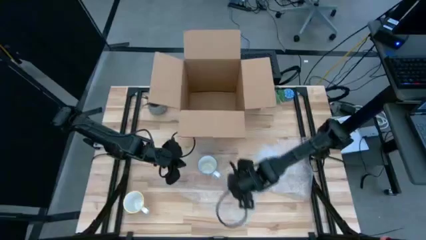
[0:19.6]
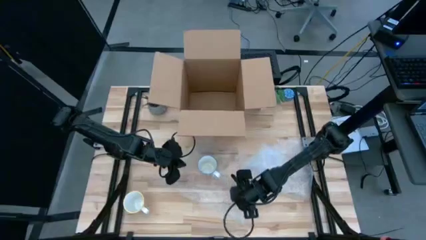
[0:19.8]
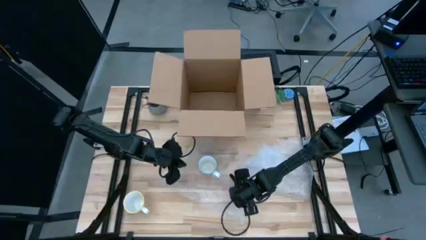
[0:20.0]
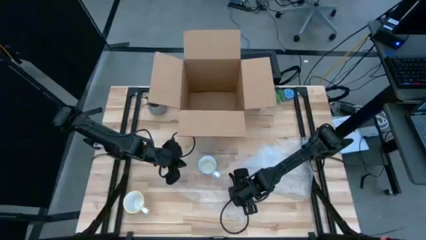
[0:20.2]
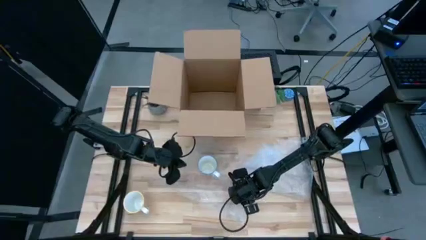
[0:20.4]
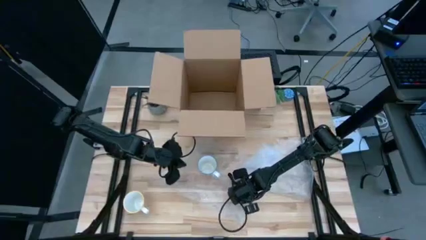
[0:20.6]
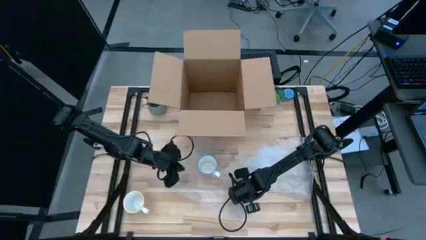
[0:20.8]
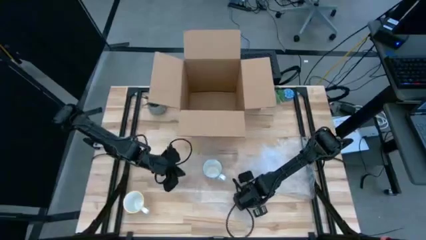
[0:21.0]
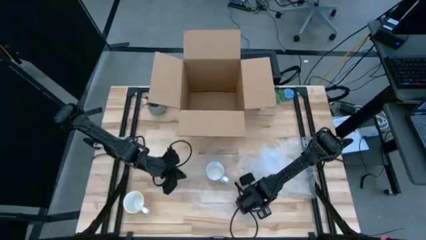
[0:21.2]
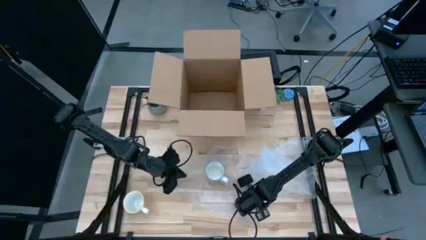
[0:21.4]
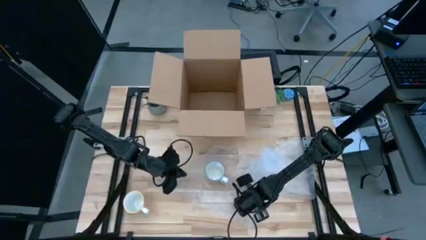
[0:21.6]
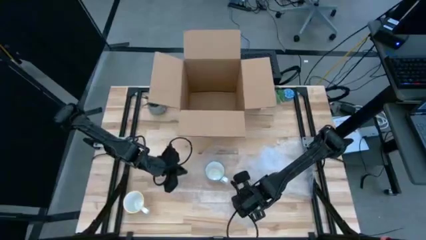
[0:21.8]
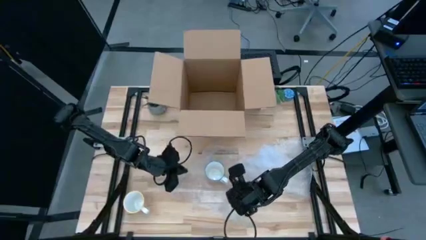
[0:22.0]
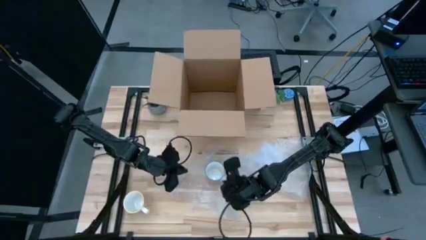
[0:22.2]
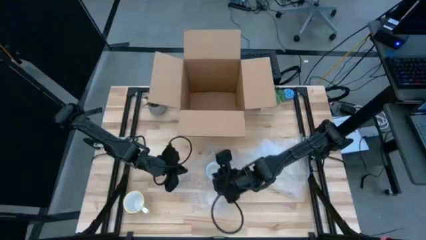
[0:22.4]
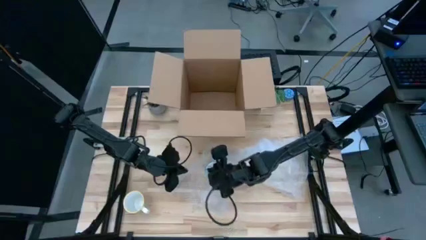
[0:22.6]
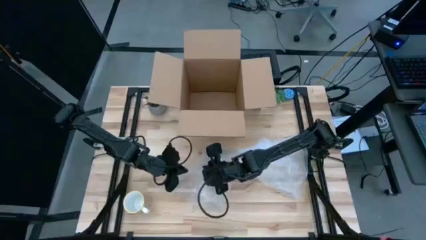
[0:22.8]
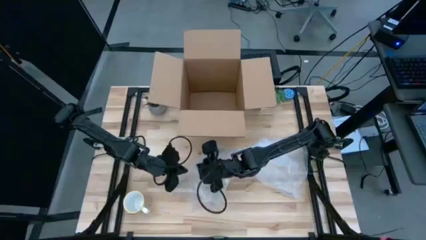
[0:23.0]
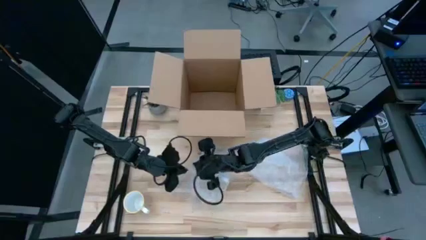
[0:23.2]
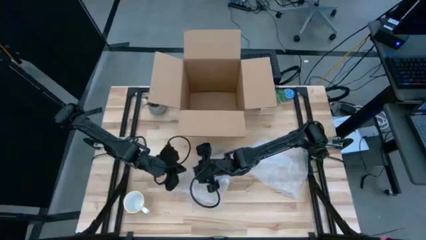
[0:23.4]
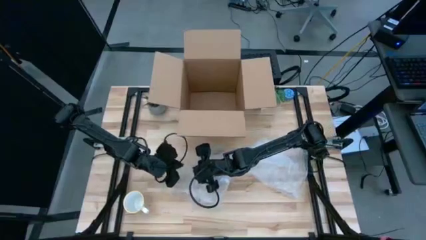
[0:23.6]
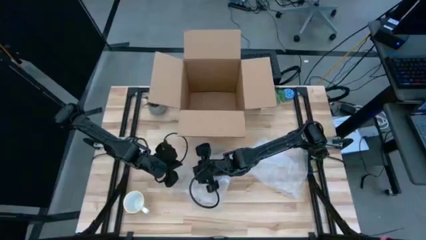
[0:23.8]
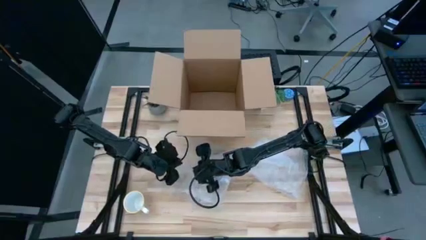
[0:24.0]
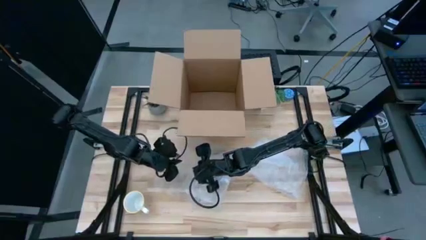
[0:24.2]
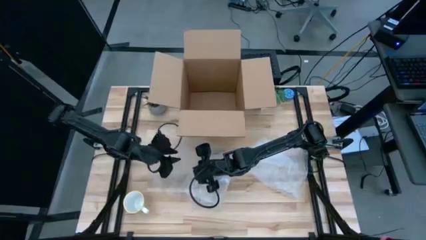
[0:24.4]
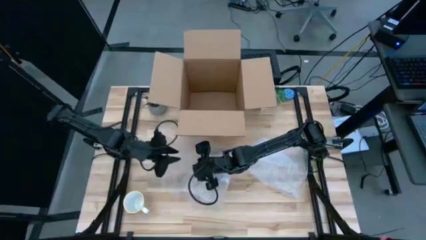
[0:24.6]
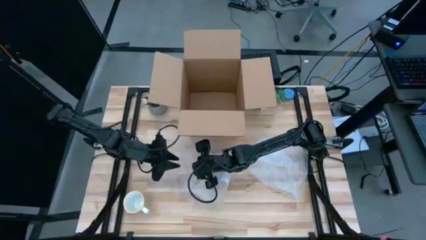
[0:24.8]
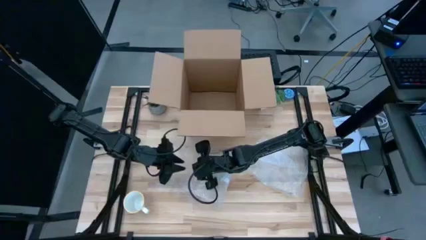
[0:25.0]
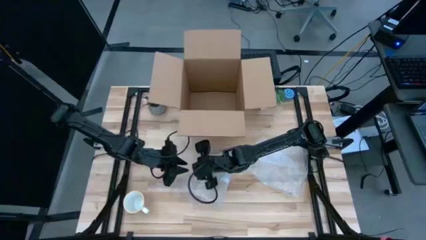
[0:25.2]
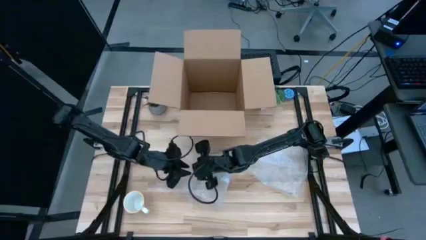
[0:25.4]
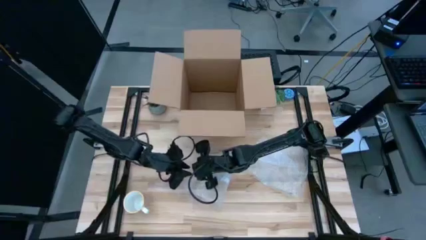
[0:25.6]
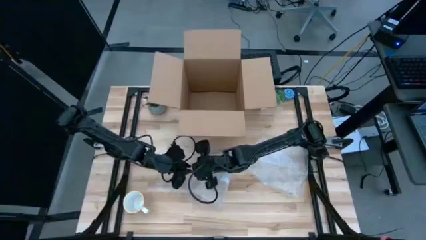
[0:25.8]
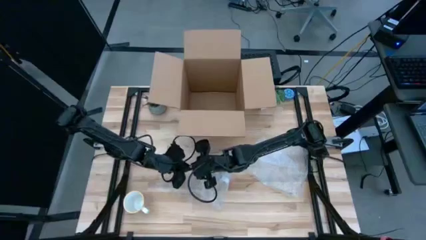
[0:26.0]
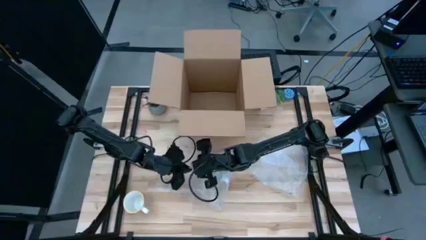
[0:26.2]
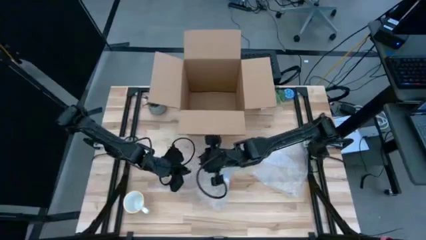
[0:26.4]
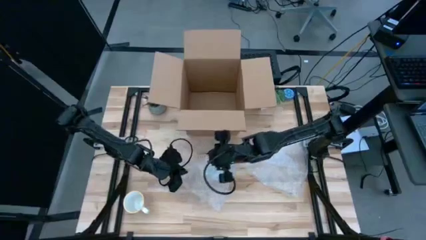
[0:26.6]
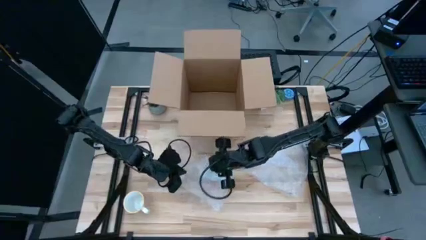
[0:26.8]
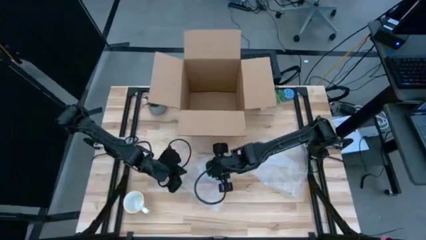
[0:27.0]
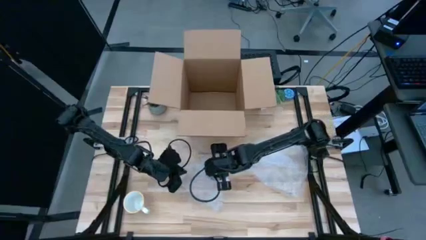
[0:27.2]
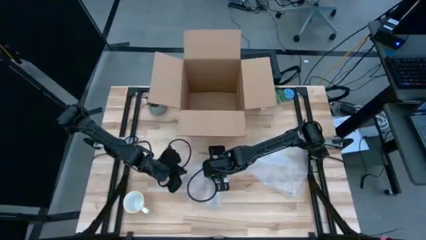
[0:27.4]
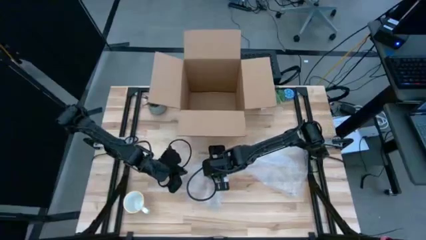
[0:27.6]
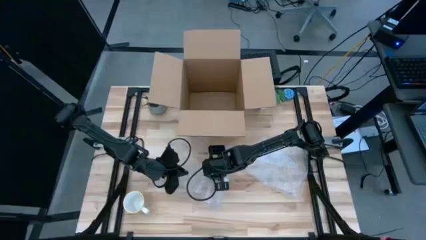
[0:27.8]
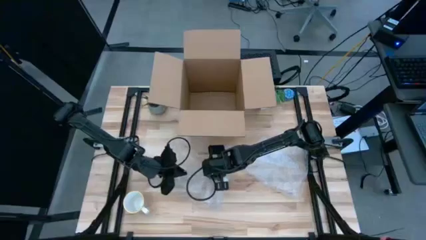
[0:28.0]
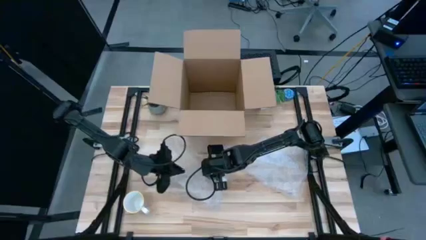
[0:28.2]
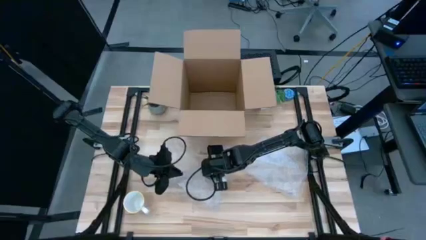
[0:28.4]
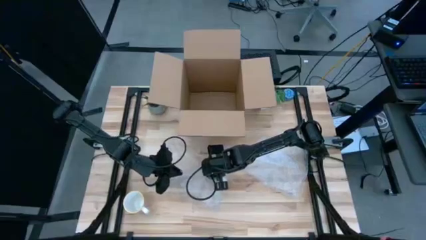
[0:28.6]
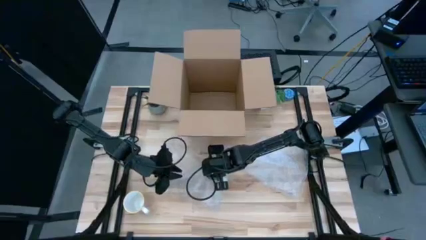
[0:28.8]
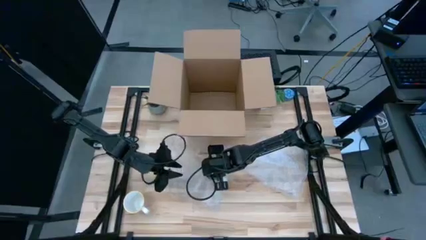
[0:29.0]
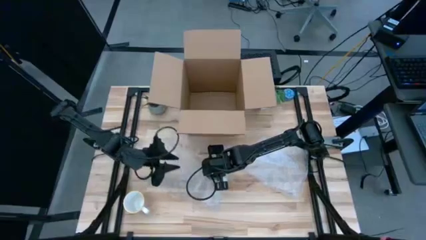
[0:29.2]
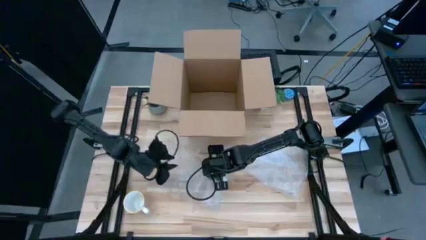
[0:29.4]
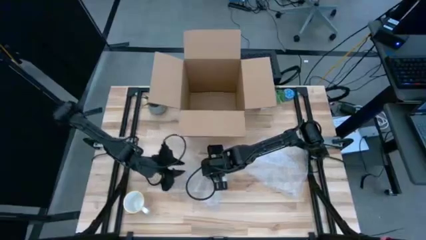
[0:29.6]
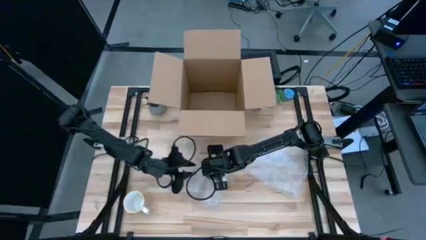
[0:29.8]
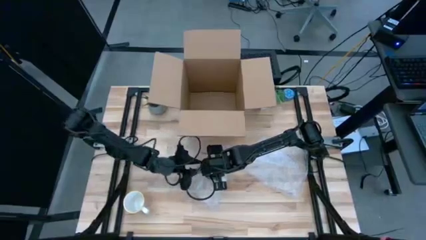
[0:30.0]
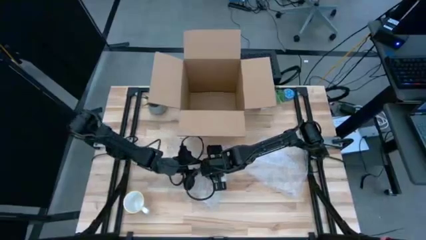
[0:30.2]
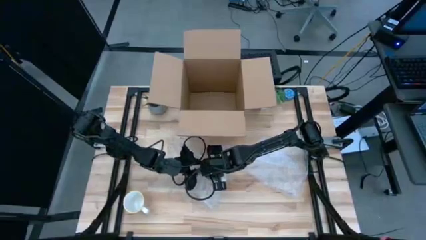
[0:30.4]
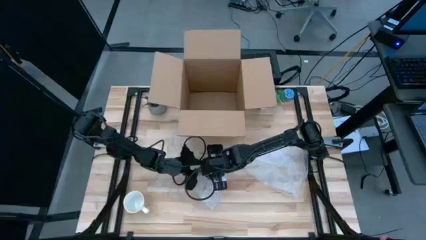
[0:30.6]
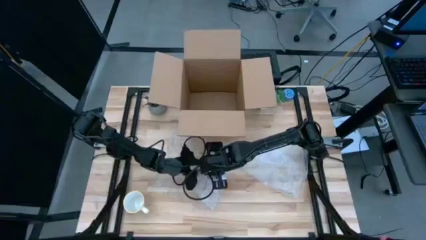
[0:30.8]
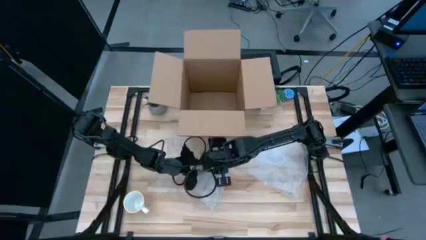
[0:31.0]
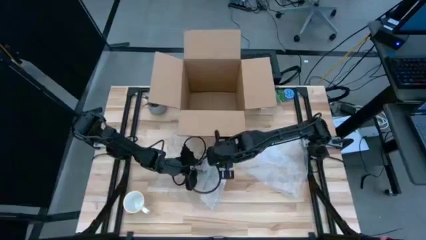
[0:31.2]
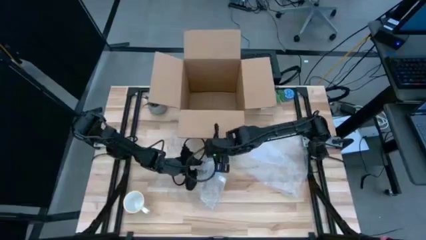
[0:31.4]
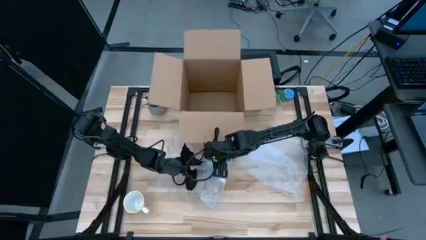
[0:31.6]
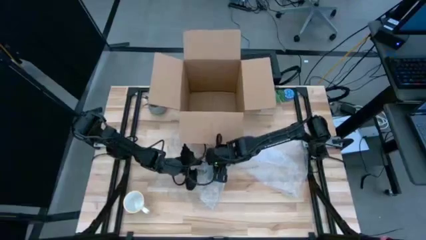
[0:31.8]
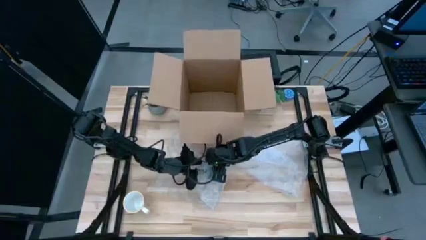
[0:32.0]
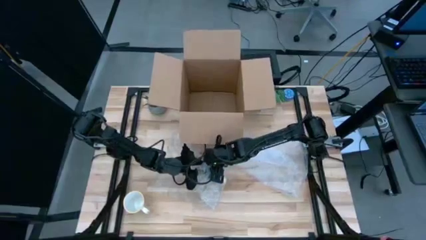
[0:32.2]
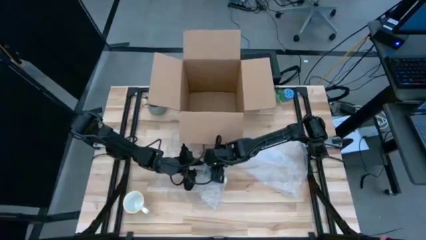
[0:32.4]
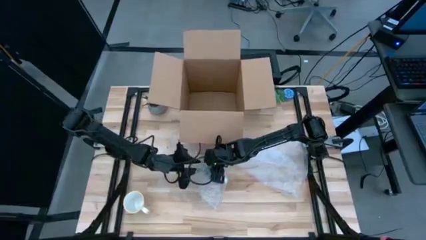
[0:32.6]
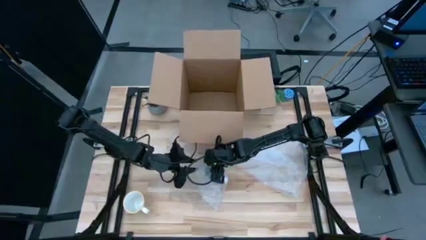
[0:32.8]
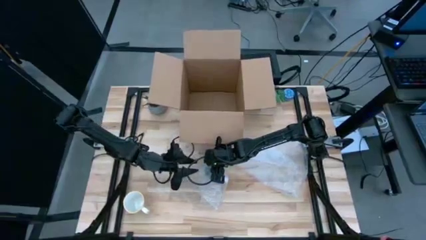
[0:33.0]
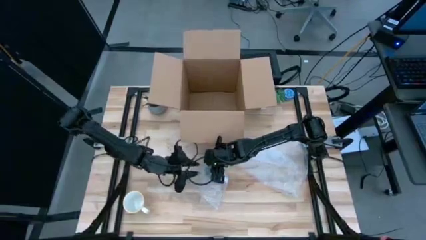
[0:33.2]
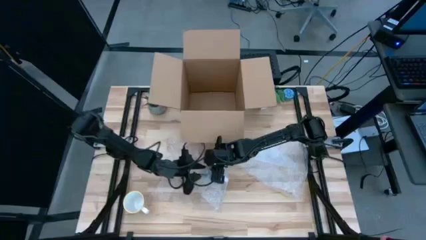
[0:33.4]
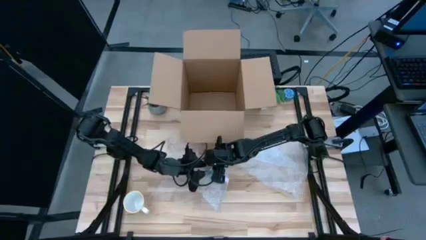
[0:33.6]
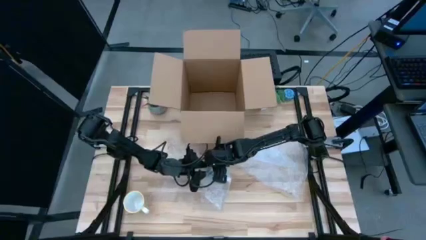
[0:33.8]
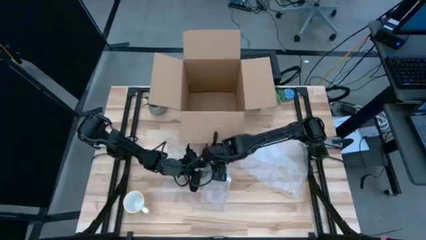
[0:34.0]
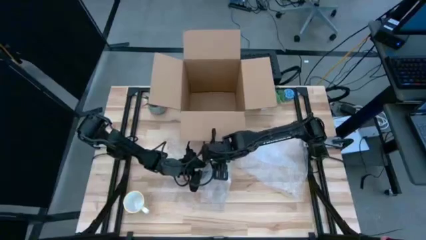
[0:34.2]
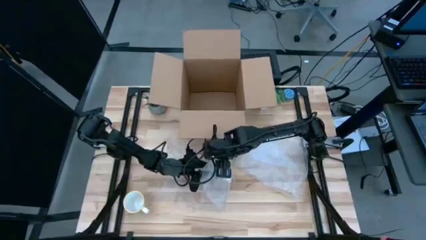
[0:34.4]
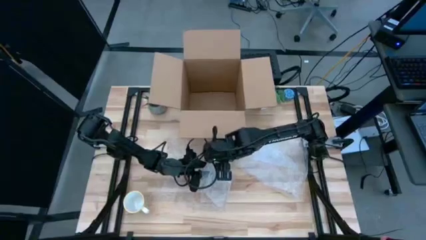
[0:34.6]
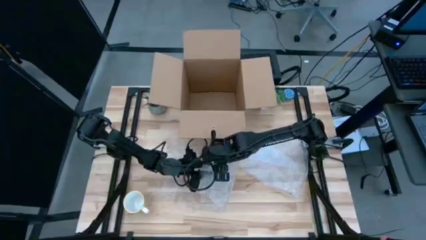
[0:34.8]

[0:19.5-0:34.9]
Task: wrap mug
Wrap the red mug with the left bubble wrap
